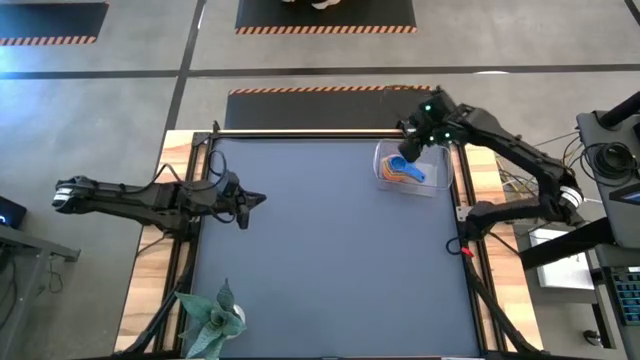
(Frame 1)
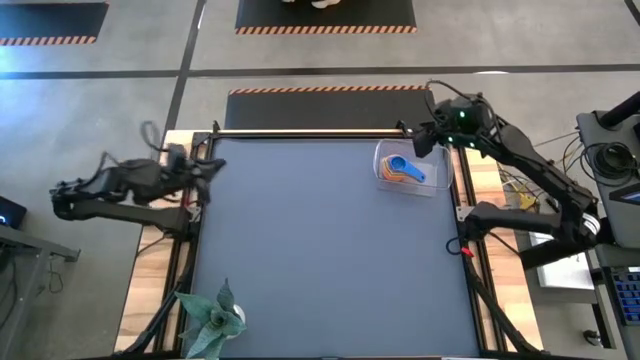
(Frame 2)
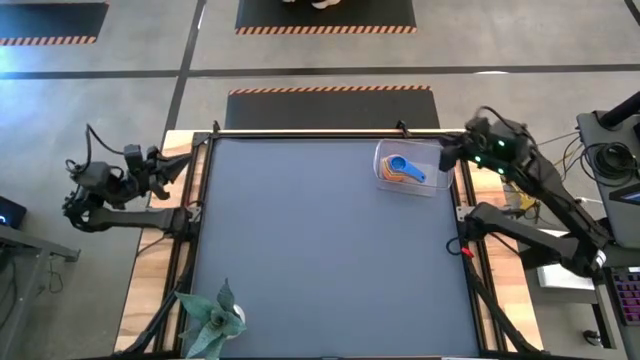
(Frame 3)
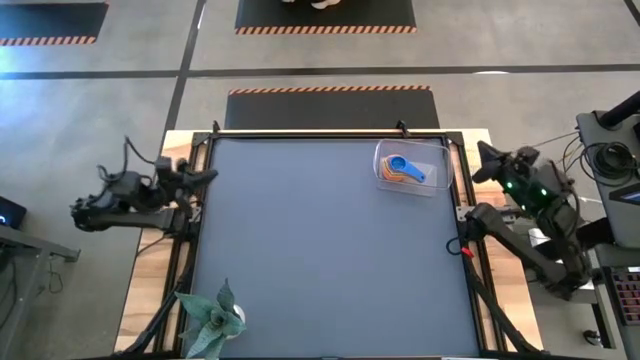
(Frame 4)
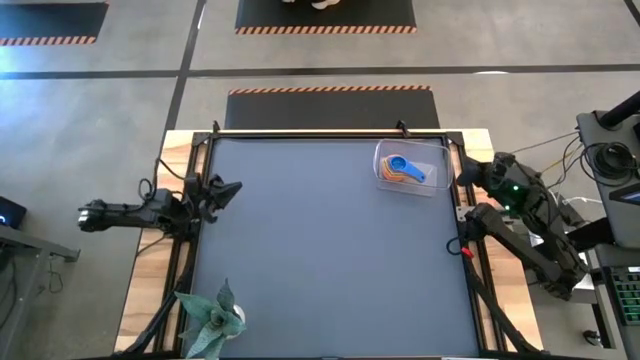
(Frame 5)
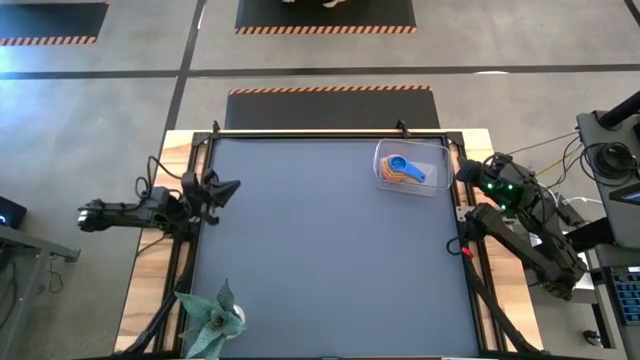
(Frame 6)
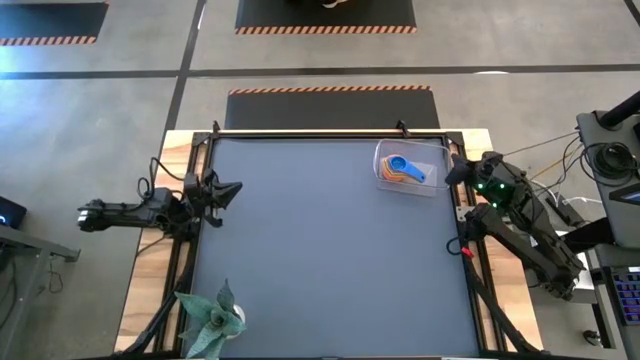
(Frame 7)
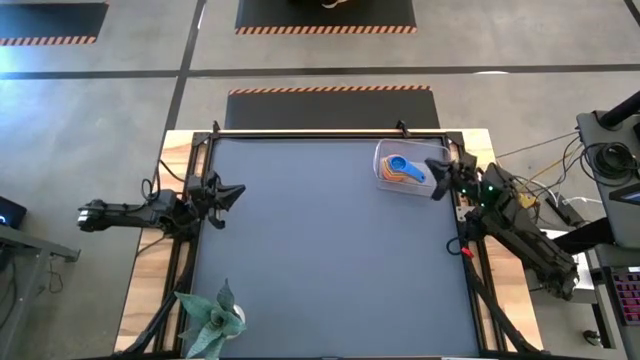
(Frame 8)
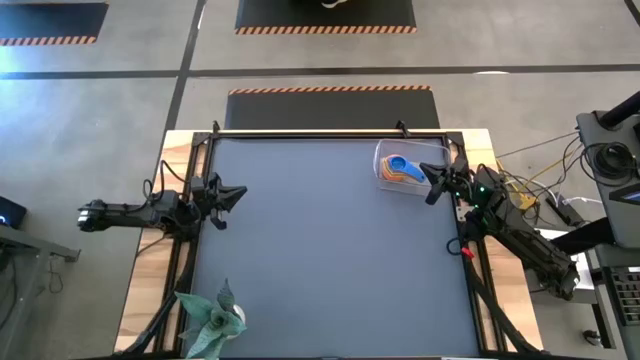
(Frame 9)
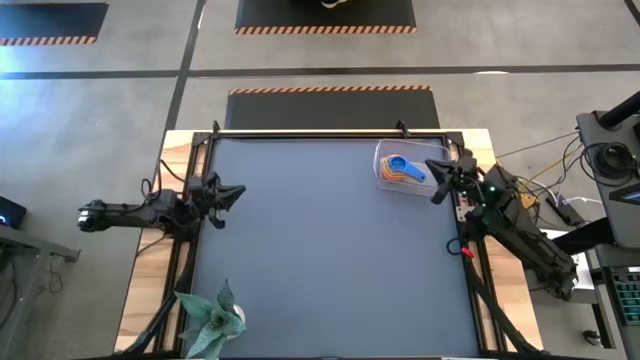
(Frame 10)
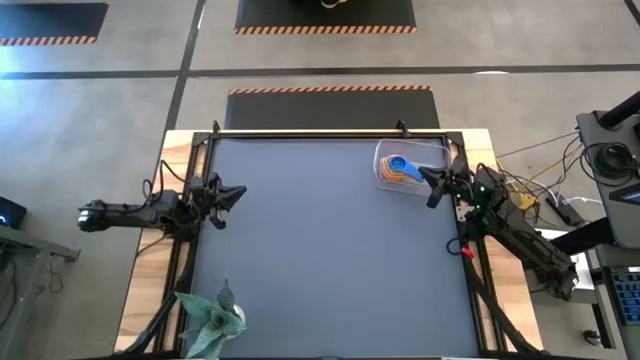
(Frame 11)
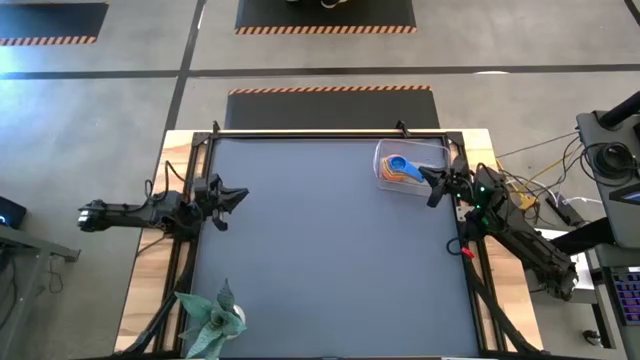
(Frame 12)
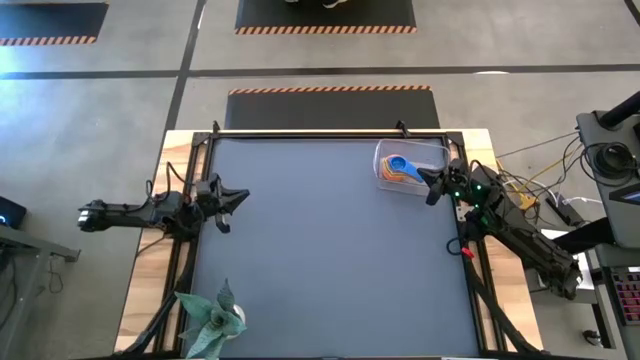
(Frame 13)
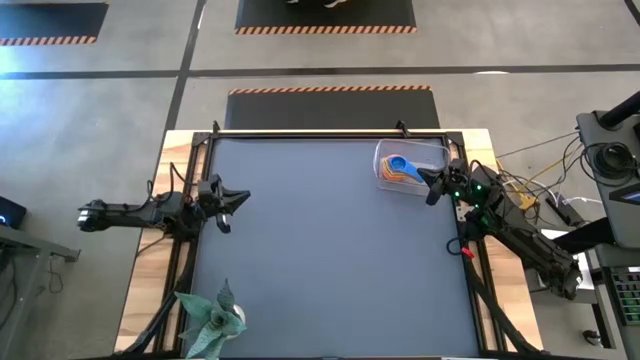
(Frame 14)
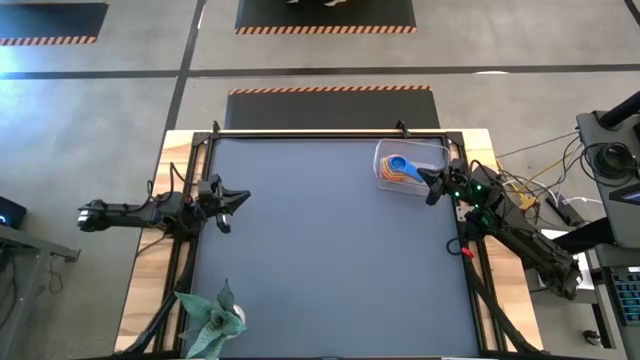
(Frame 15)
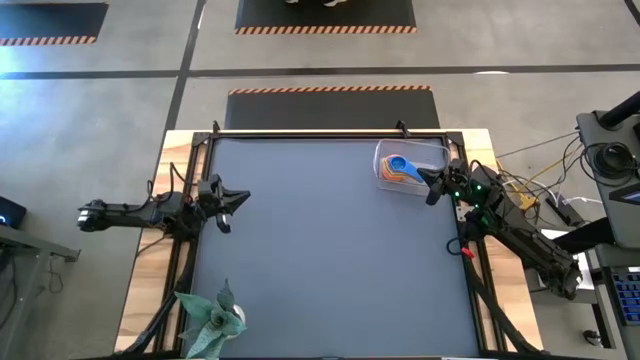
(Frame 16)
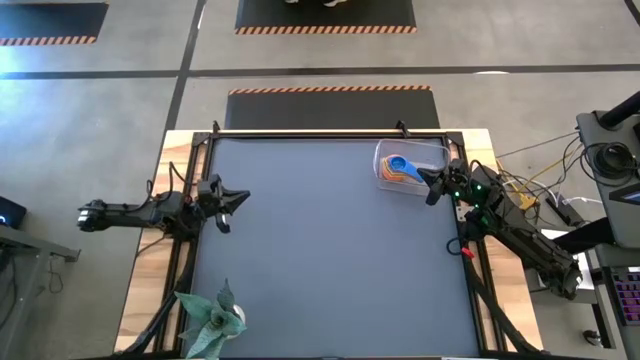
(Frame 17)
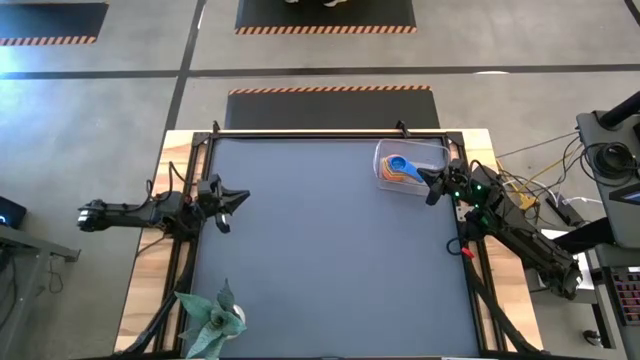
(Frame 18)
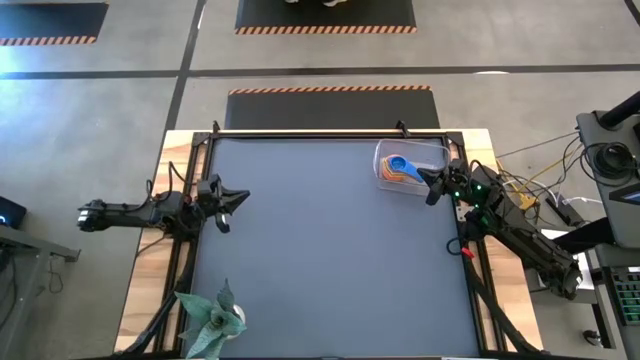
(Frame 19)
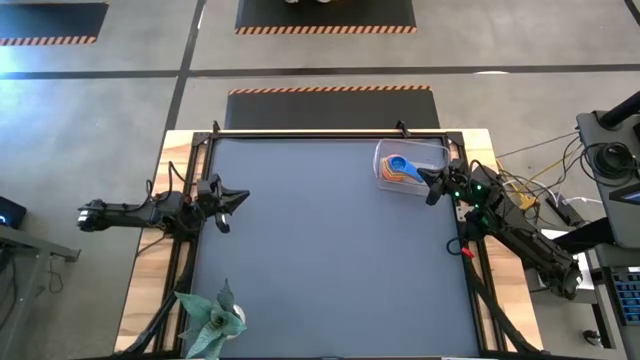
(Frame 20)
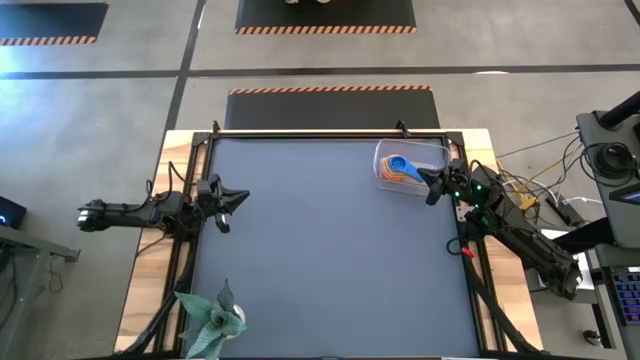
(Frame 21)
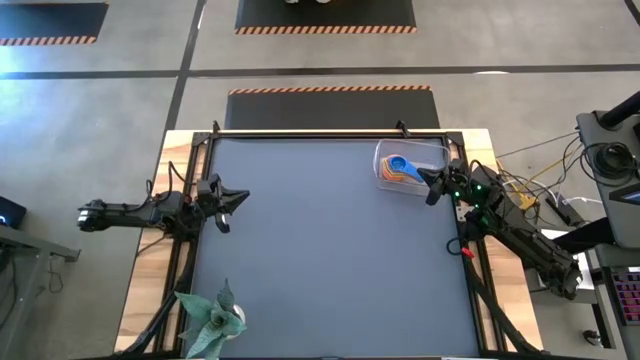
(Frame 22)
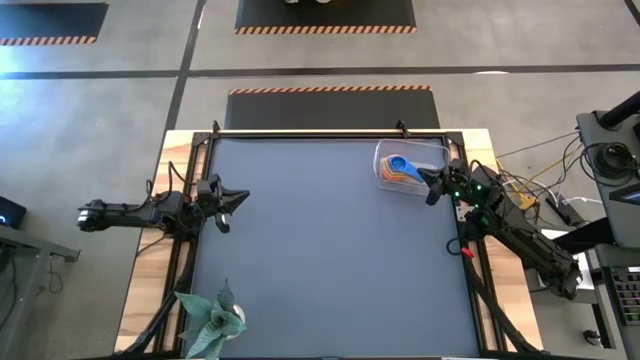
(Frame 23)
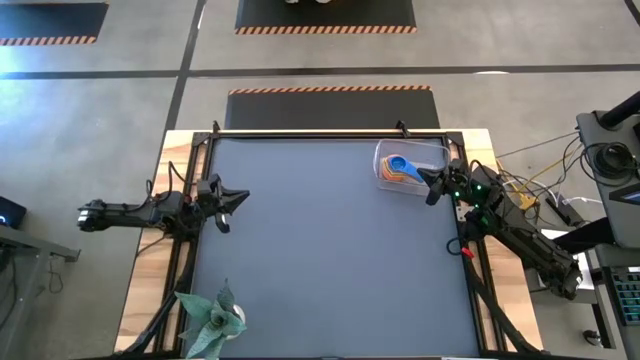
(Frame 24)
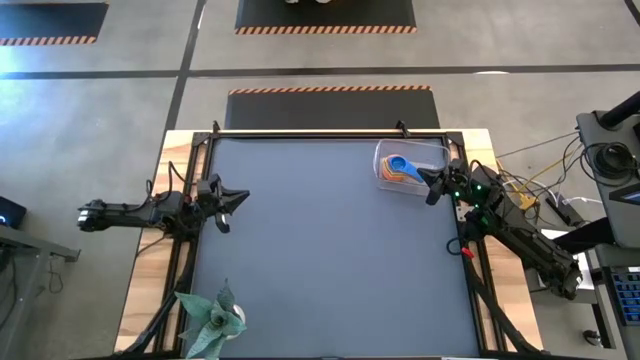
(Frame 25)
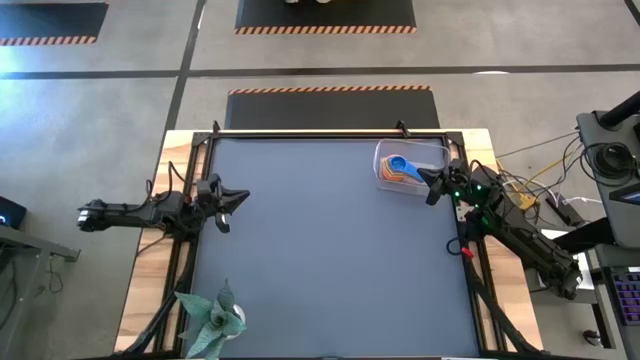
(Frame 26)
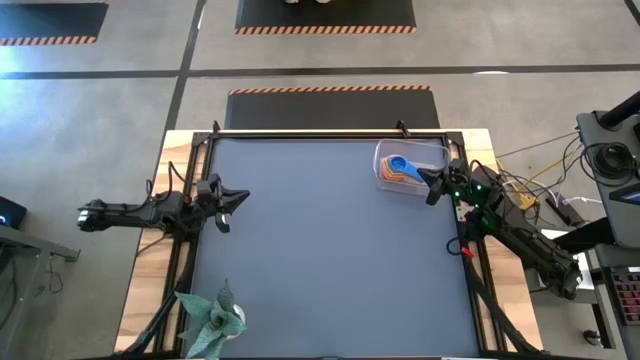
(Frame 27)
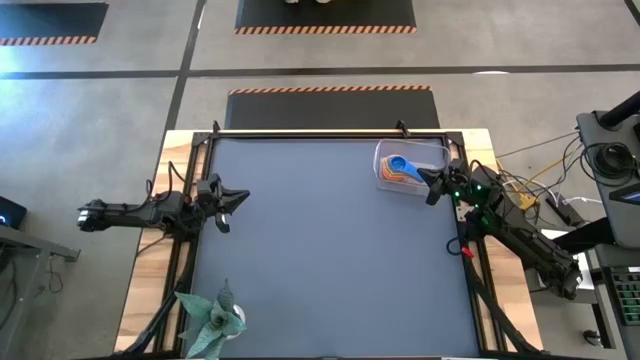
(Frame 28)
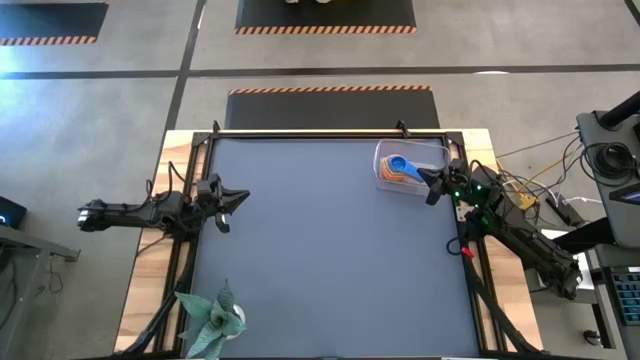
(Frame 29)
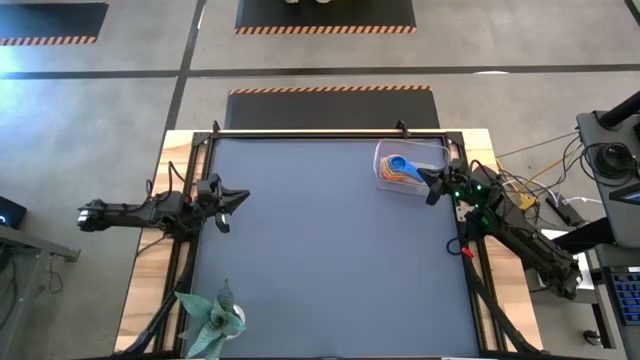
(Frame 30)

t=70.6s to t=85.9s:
Task: Nest measuring cups in basket
Return to Home Position

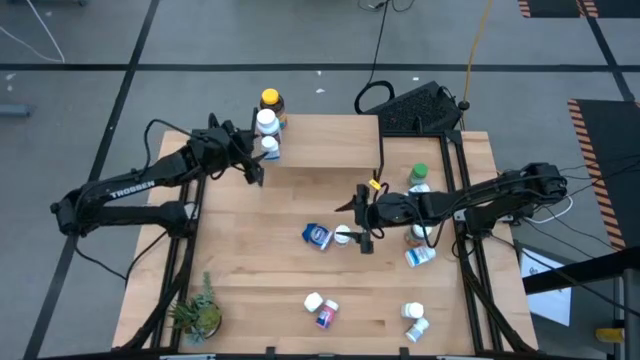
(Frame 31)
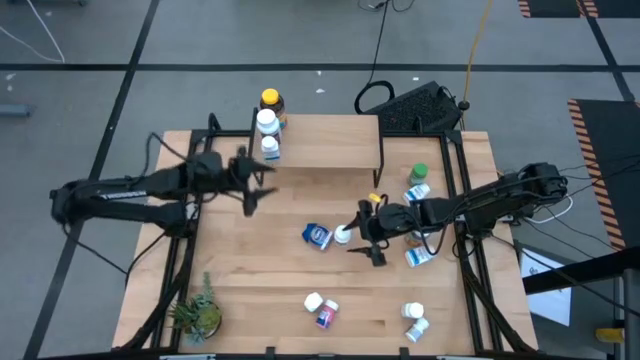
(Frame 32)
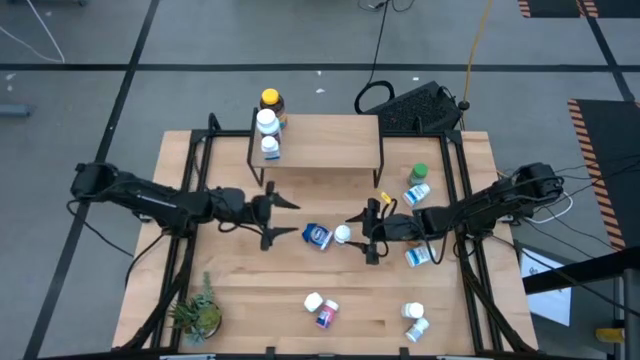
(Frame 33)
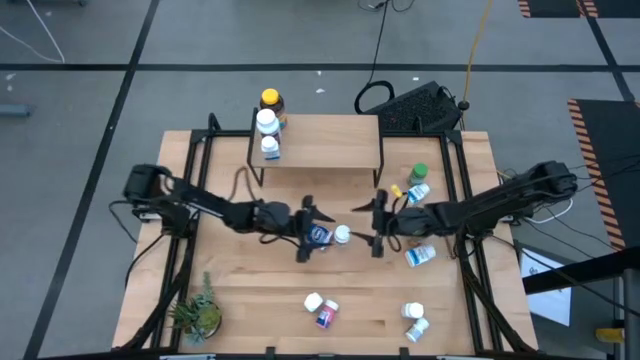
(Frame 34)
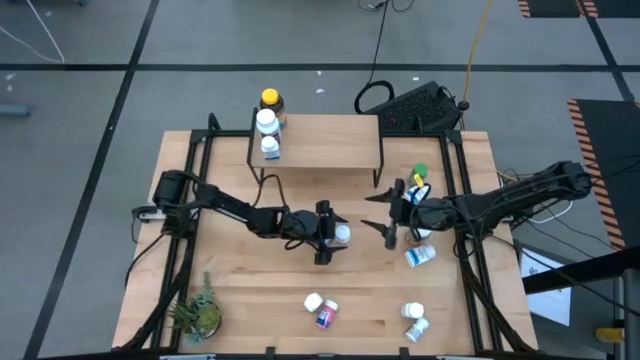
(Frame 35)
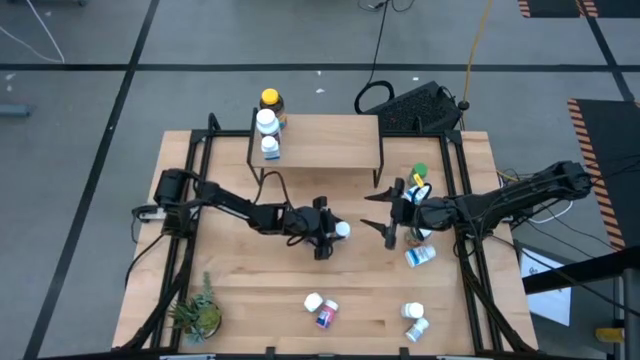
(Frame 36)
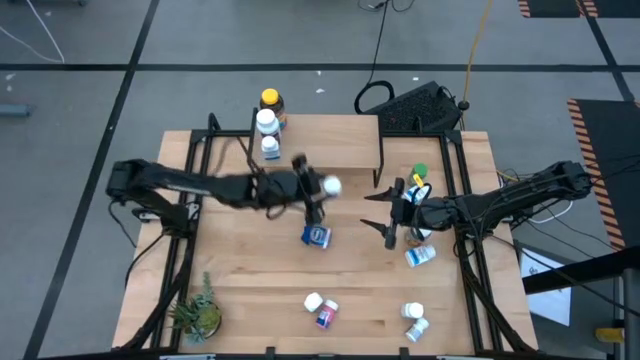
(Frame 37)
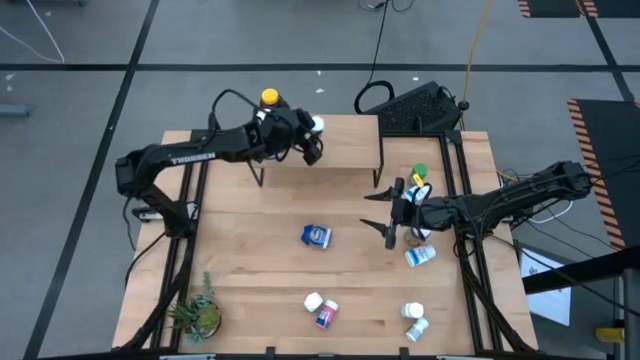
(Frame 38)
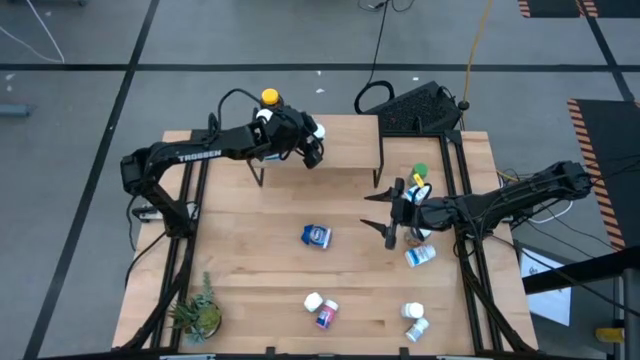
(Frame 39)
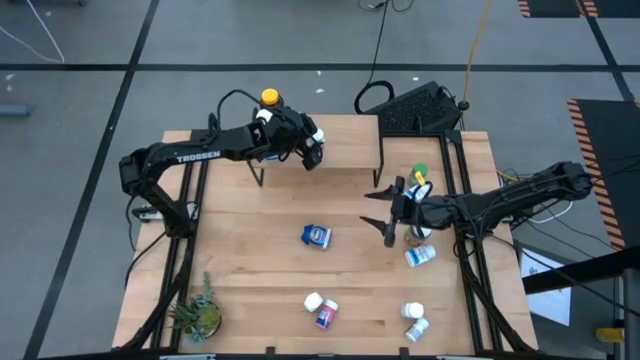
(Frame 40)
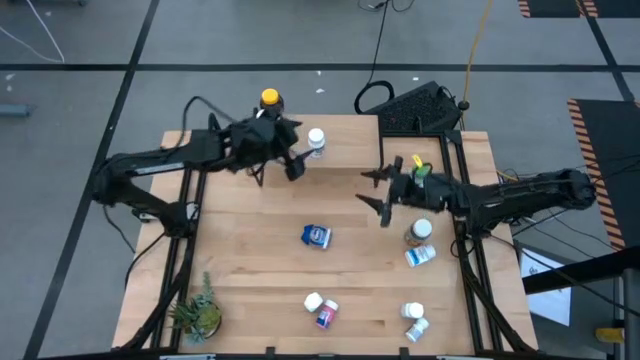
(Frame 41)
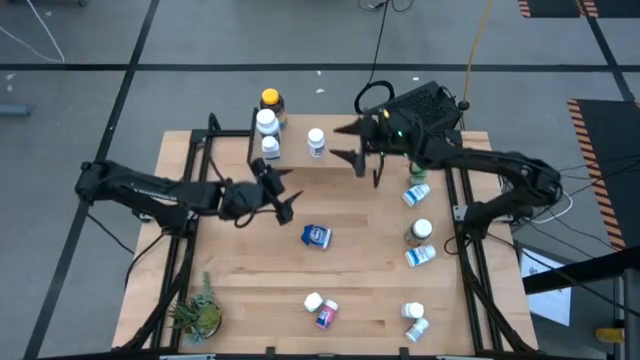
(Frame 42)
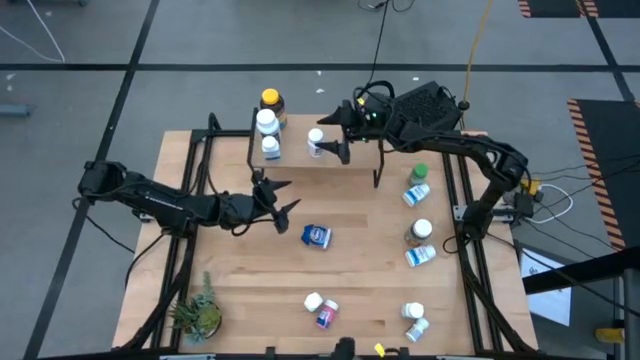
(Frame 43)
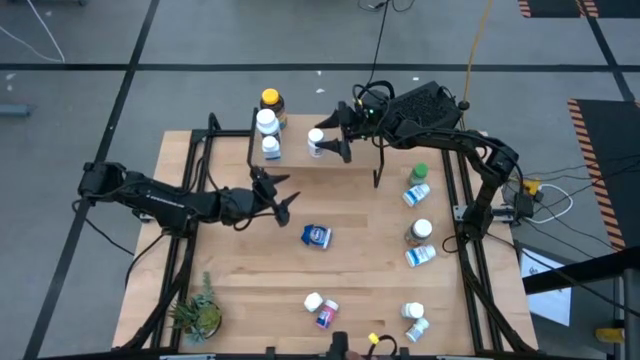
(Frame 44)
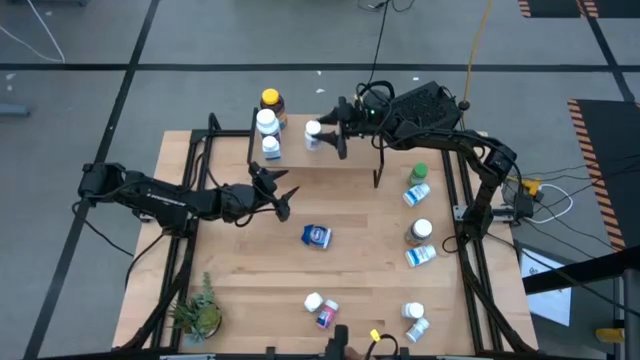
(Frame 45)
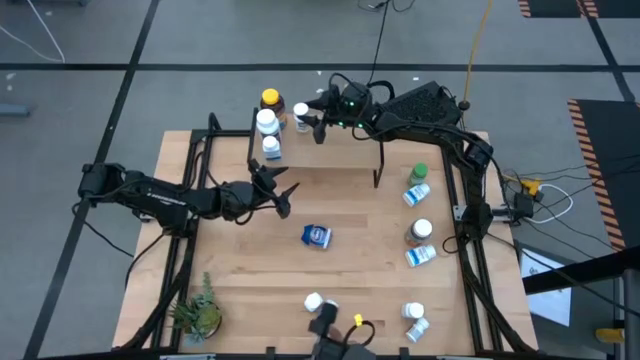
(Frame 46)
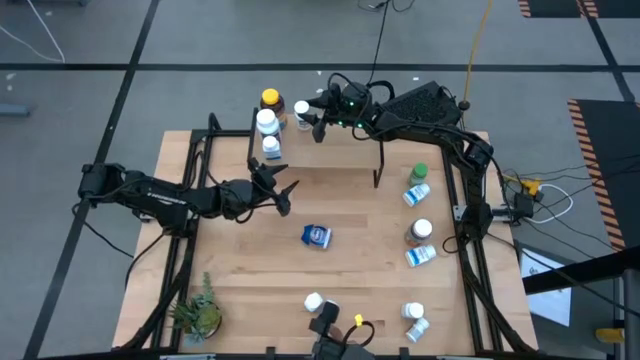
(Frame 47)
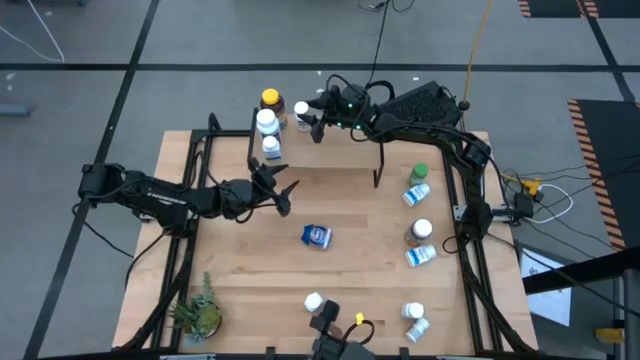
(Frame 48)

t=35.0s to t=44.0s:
Task: Pick and place medicine bottles onto shelf by color
Put the white green medicine bottle on the shelf
